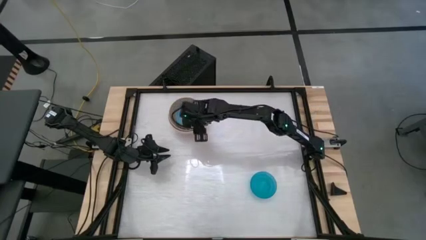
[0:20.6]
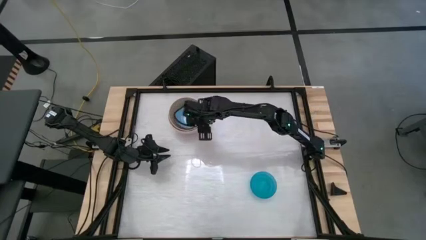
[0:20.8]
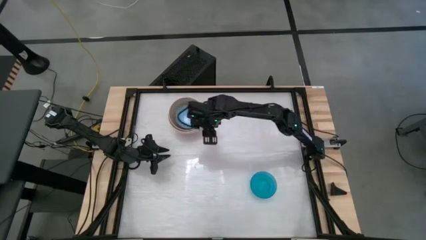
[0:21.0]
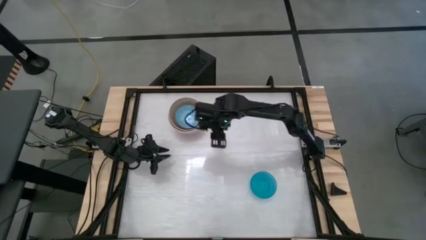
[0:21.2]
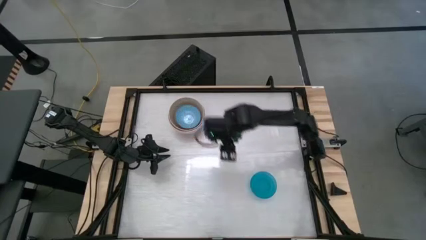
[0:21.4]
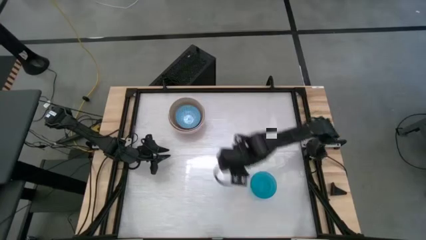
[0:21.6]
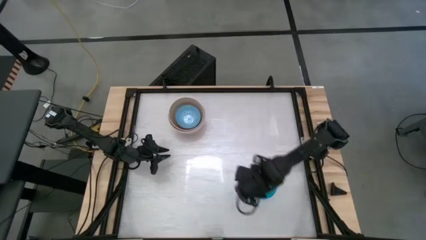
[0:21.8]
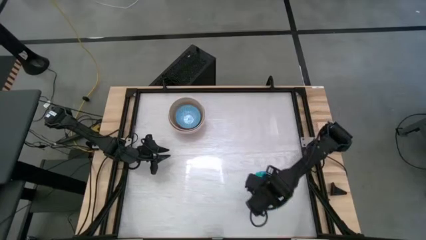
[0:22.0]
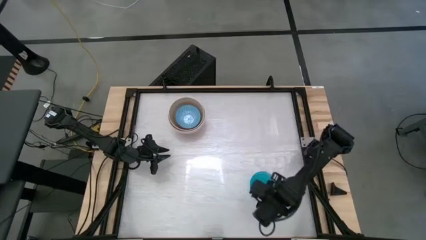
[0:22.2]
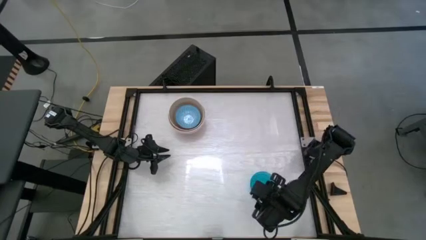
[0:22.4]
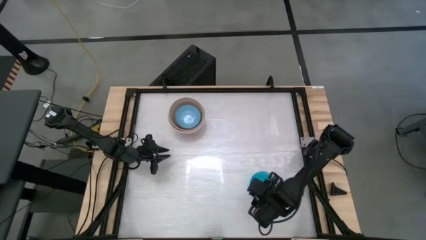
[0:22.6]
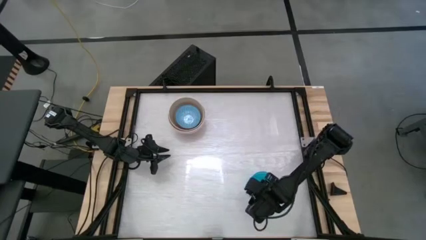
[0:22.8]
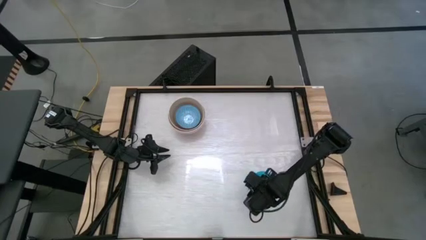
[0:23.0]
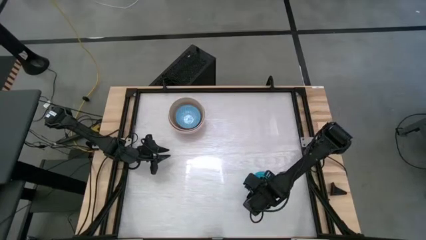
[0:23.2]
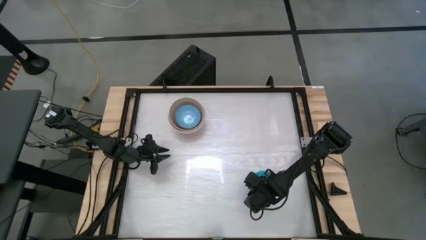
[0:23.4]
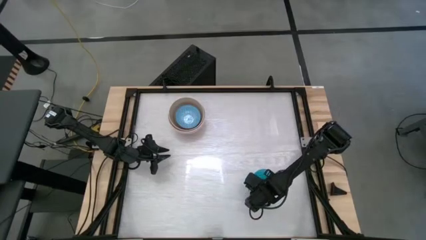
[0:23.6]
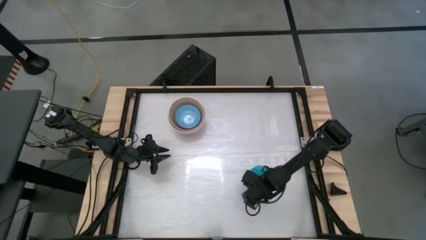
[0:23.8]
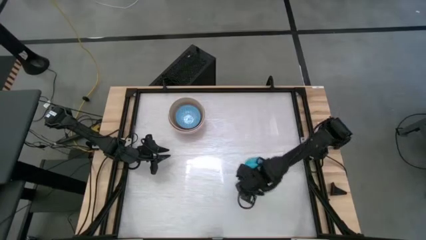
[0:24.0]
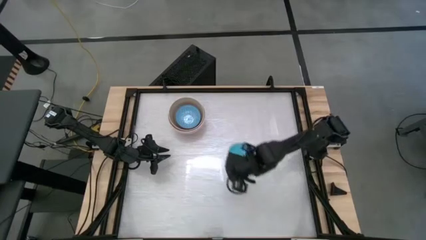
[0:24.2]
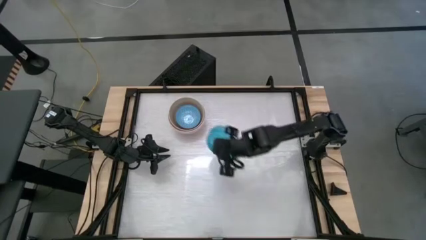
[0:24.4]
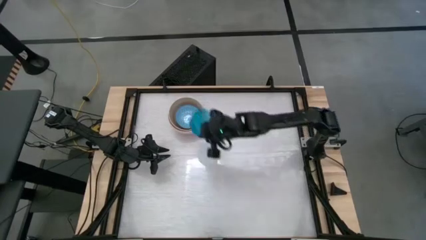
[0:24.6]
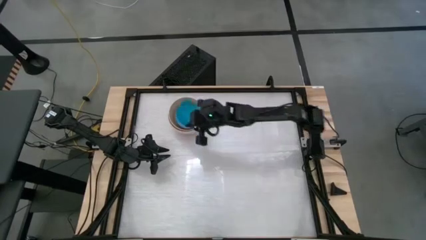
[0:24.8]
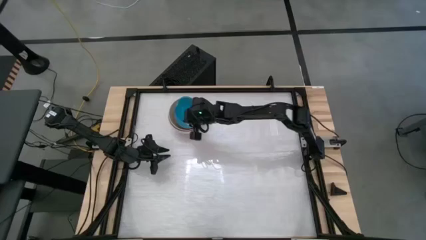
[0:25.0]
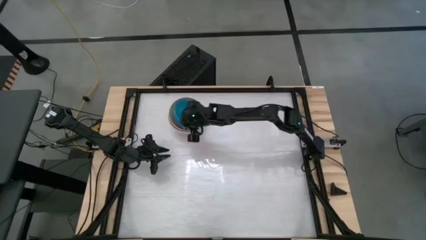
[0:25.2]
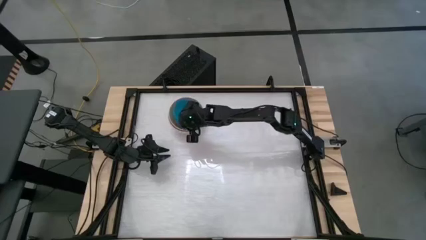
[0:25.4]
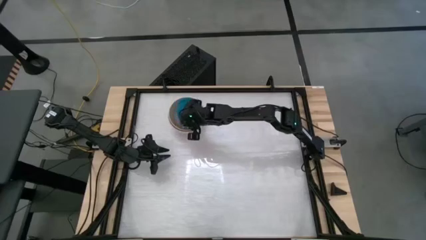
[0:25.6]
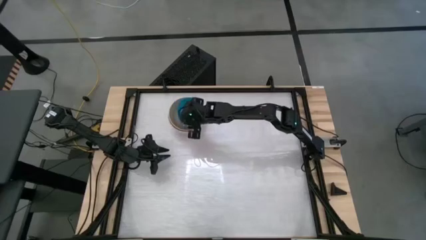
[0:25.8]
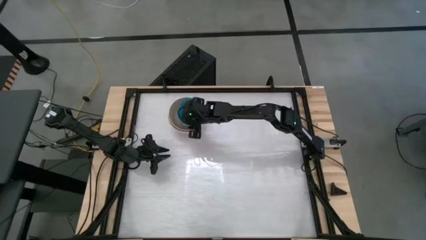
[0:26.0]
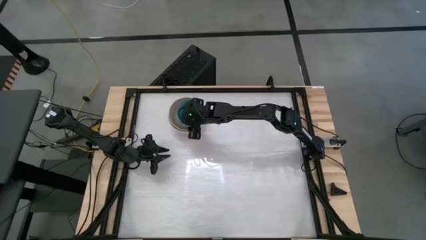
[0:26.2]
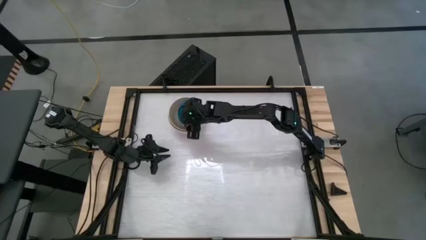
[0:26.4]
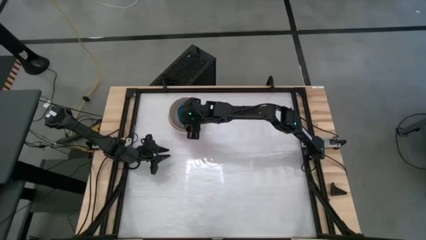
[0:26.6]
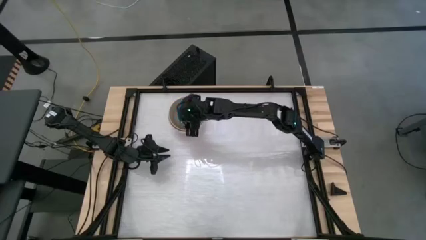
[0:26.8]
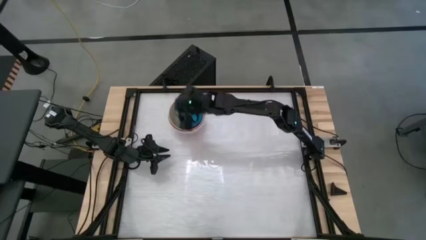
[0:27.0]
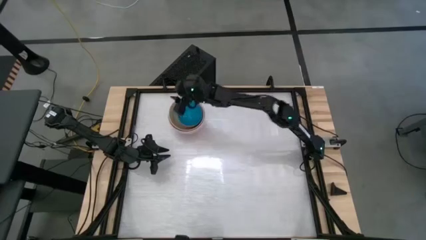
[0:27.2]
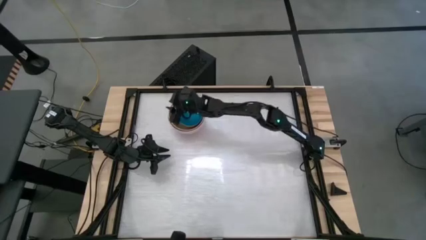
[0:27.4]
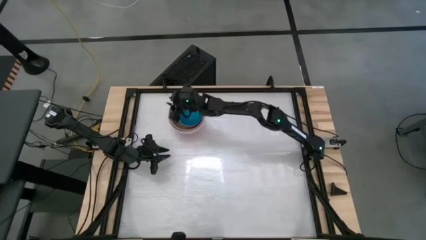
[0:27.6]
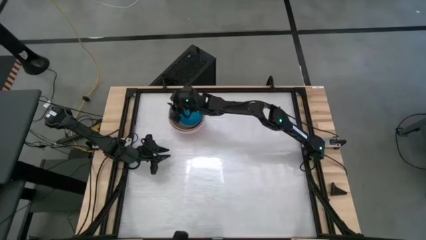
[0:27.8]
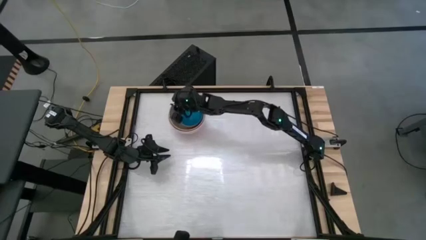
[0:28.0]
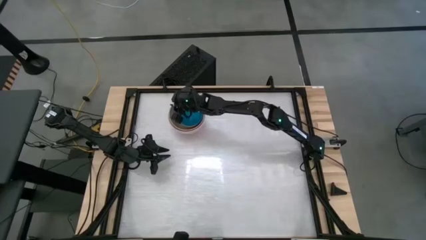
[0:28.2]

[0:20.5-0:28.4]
Stack the blue bowl on top of the orange bowl

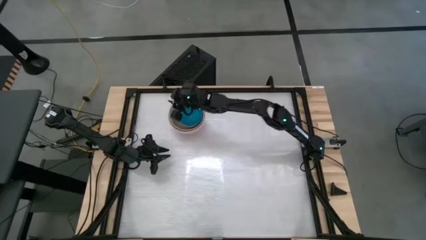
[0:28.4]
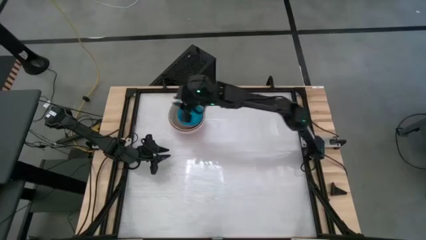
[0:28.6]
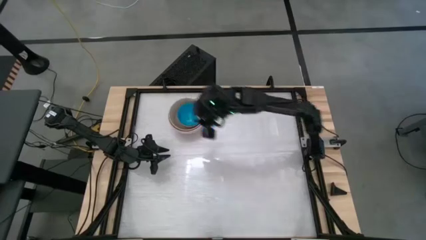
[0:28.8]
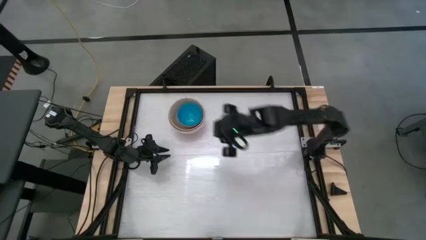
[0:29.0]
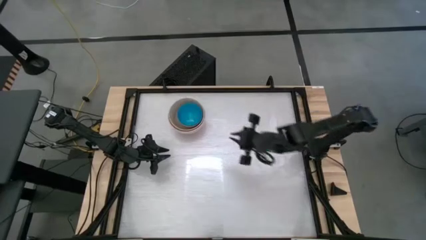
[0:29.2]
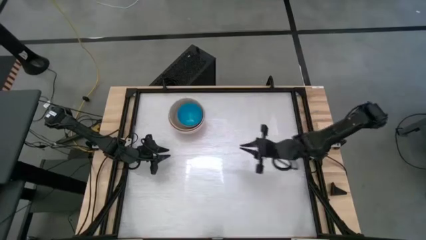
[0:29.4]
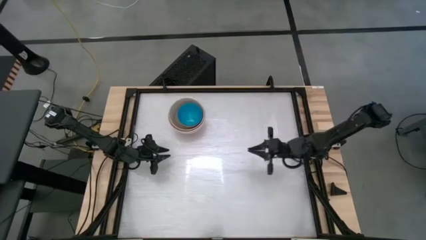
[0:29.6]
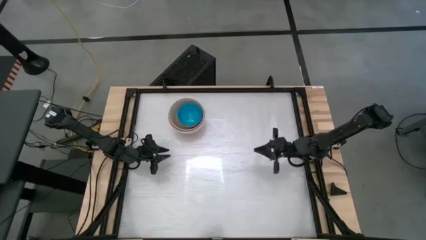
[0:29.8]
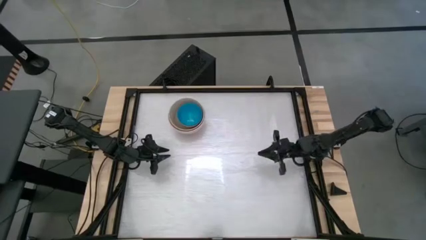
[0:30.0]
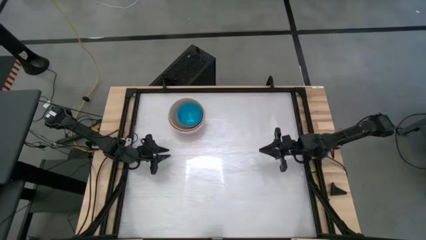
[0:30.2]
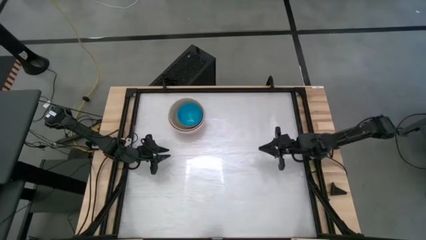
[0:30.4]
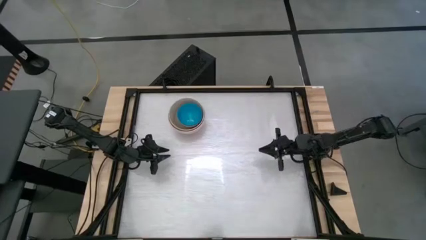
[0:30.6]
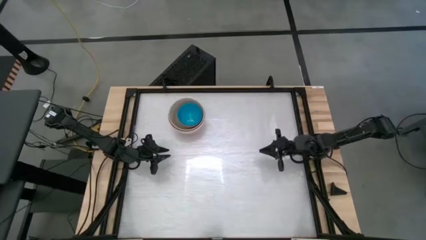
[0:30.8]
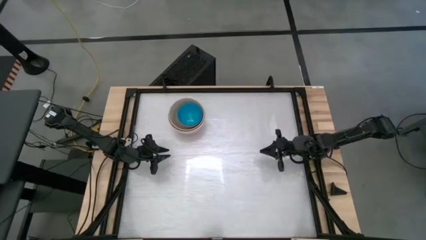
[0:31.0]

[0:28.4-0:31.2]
Return to Home Position
